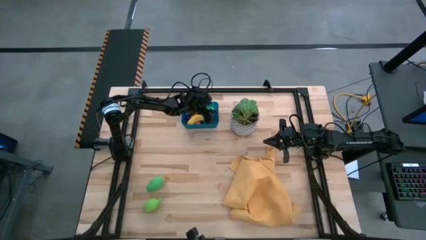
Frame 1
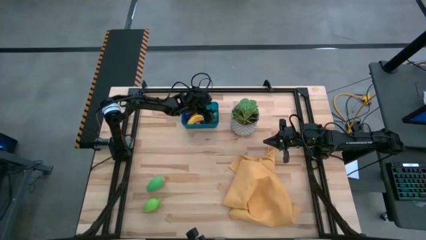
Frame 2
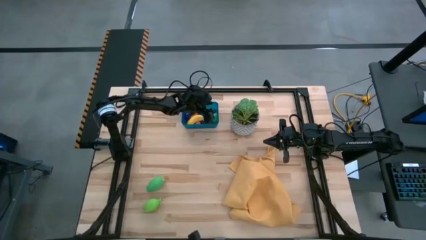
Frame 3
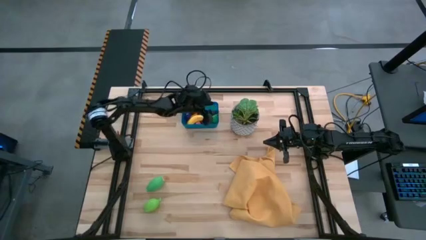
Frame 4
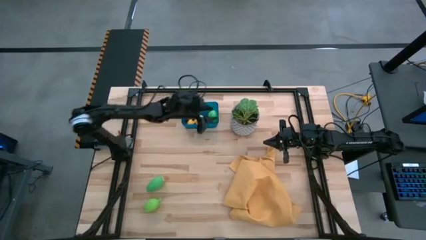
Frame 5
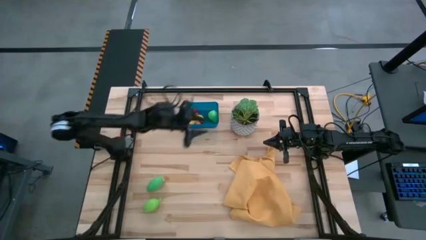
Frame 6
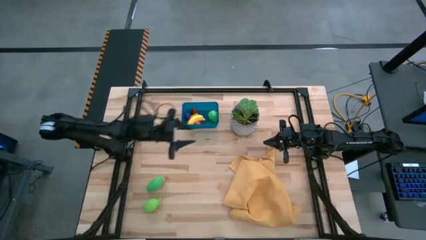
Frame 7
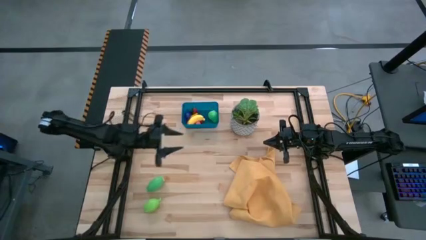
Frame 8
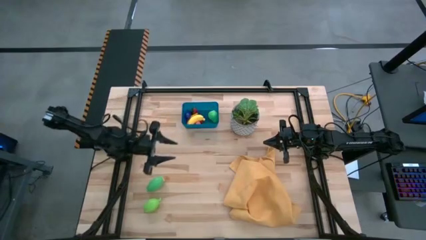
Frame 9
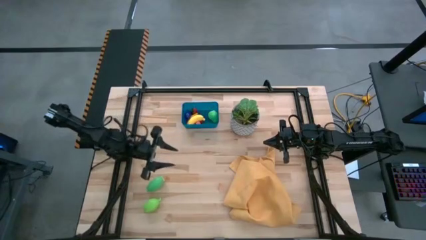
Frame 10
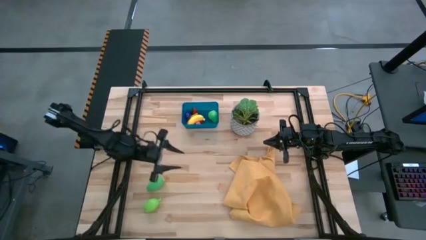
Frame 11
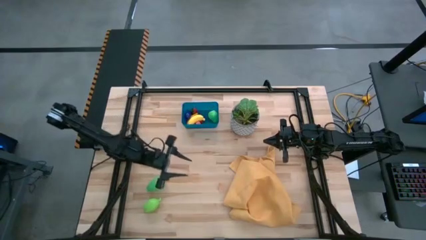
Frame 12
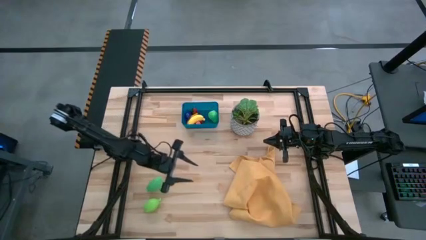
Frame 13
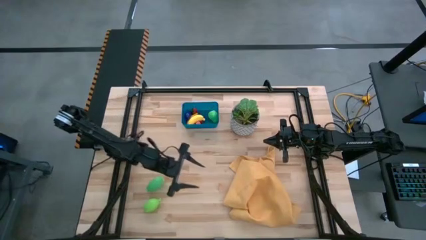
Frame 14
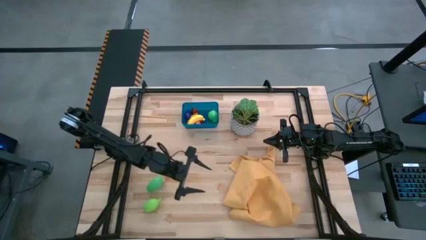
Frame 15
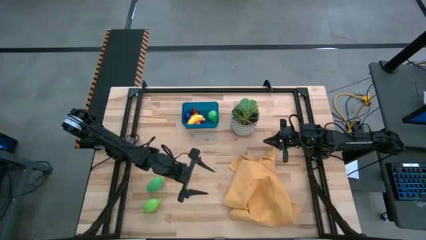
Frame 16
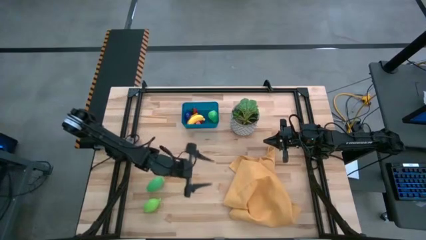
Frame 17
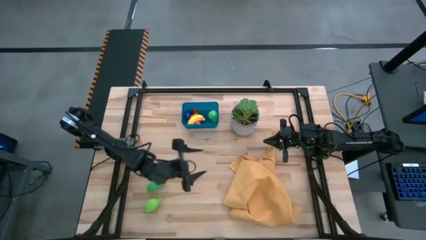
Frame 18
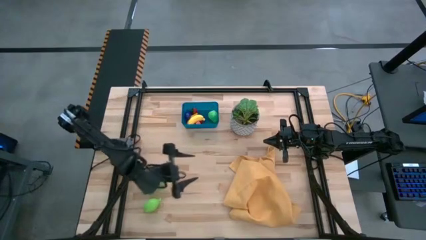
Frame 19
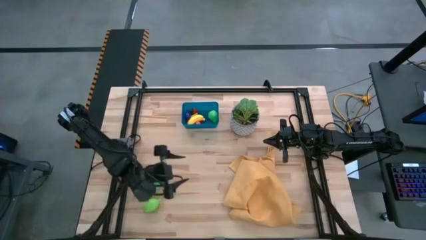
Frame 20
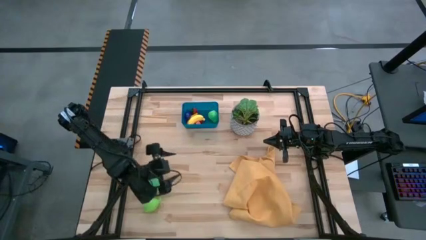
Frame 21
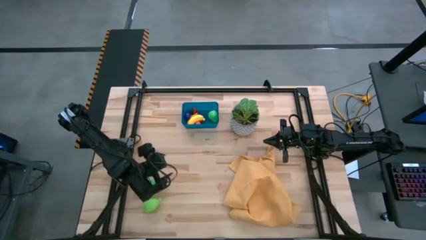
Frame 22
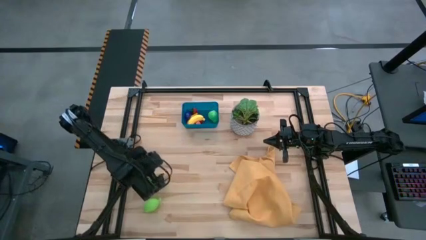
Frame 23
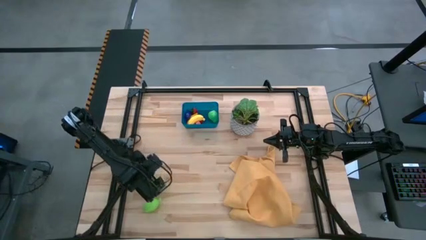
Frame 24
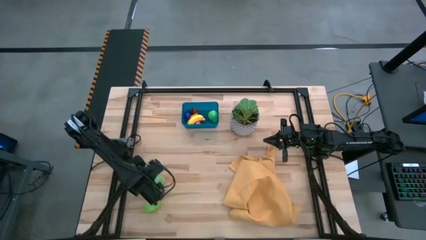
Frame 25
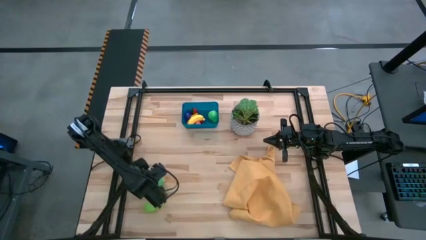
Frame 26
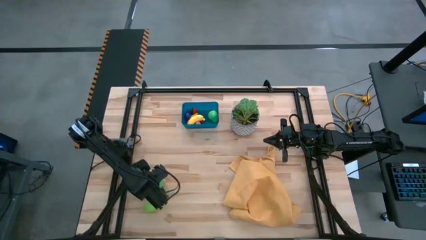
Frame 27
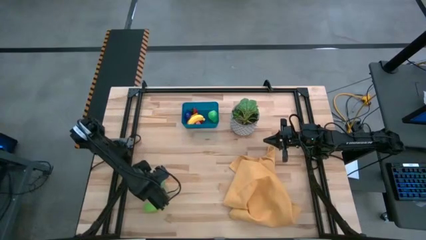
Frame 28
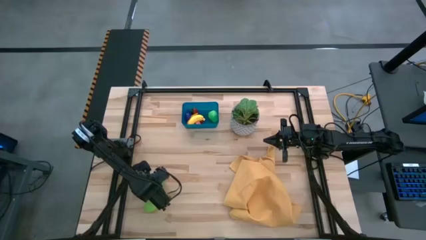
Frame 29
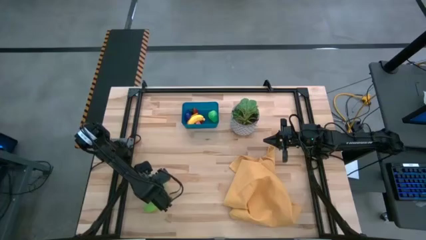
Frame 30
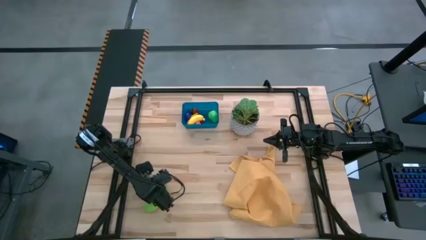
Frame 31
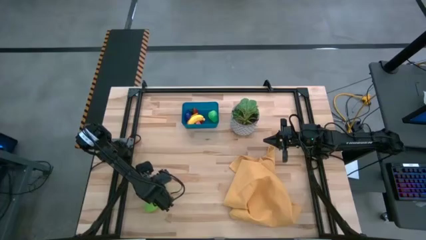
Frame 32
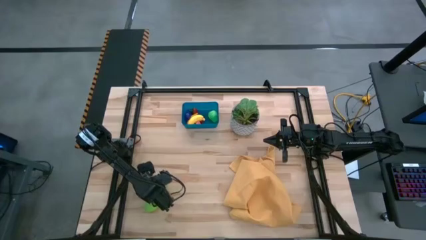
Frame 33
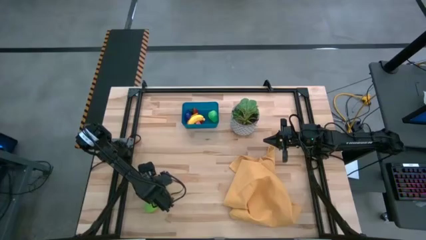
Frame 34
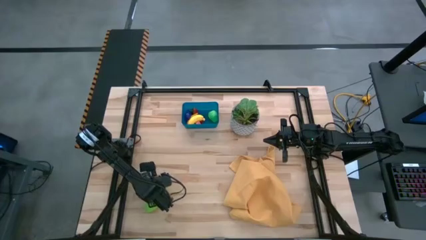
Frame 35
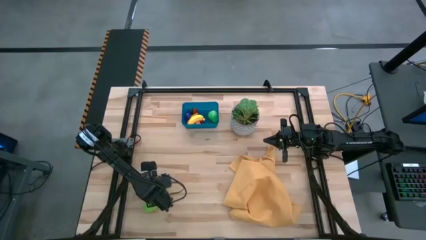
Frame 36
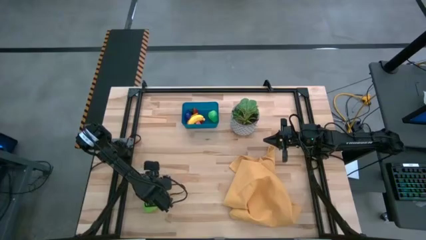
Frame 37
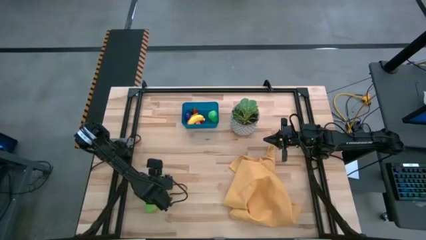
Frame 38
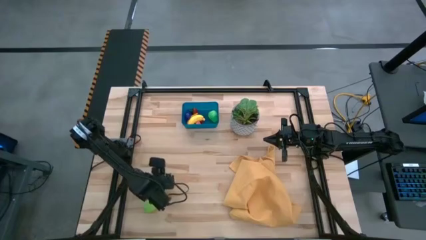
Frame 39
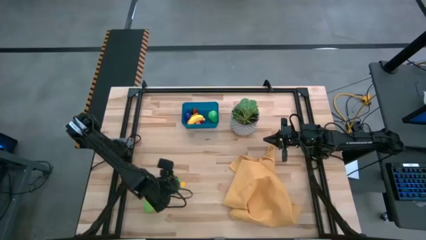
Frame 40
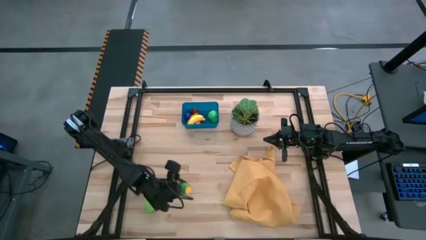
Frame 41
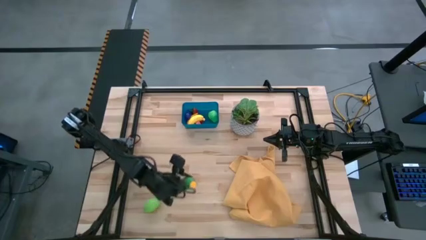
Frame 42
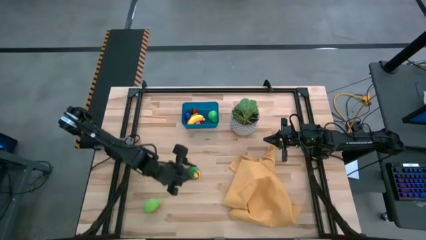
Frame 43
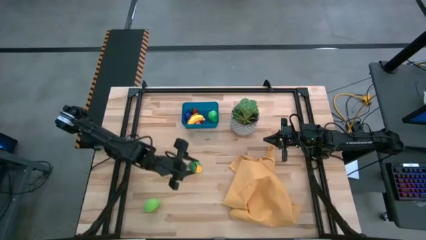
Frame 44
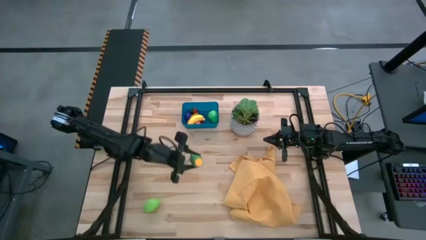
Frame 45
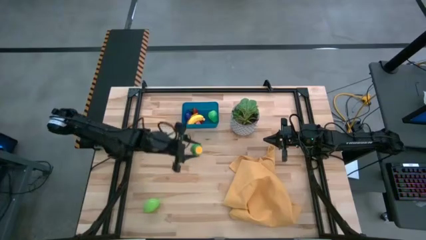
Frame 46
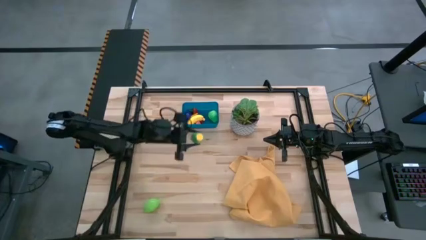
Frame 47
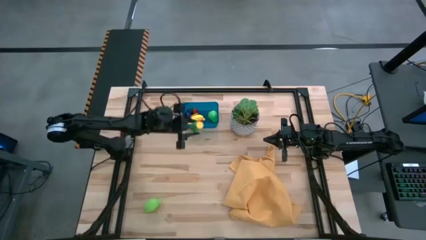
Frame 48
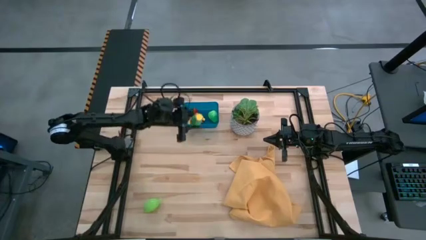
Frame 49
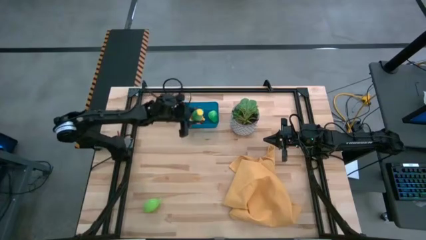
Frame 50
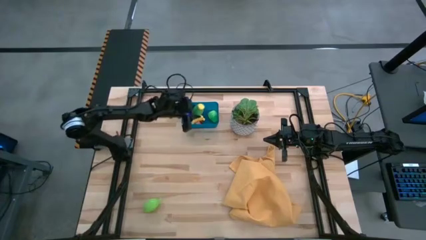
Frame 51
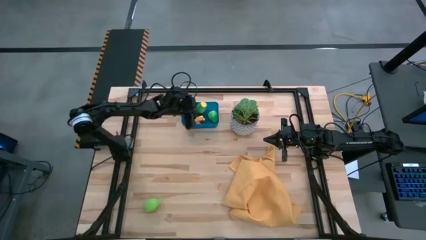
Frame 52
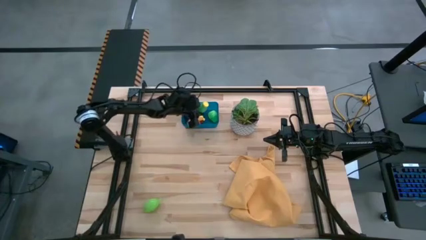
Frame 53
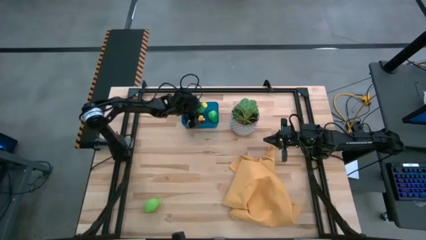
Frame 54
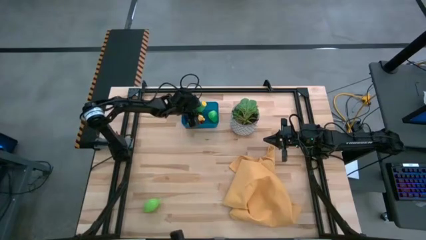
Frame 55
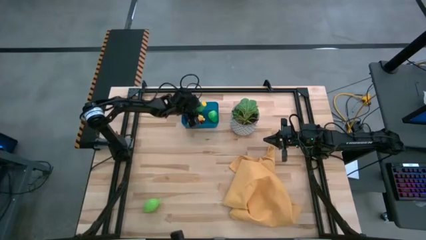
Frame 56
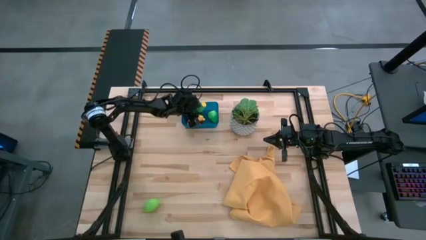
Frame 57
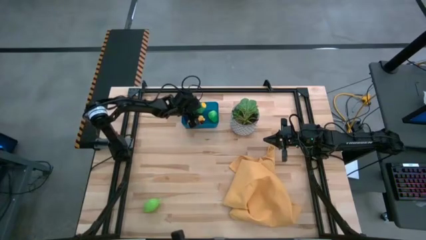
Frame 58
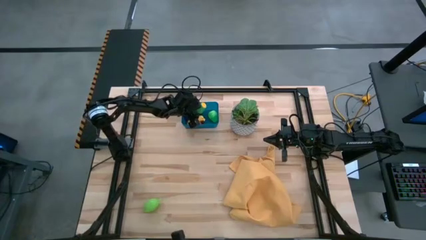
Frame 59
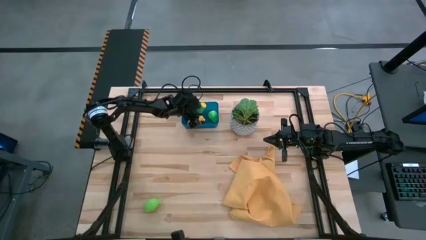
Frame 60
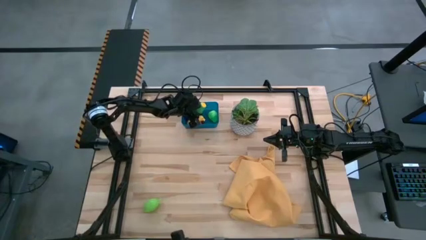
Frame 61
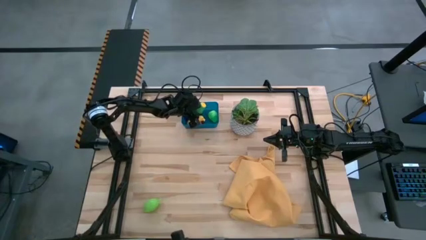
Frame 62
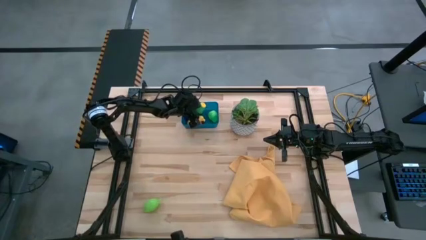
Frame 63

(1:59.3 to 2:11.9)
Task: Pick and placing Produce into tupperware
Put the green corn into the blue bin

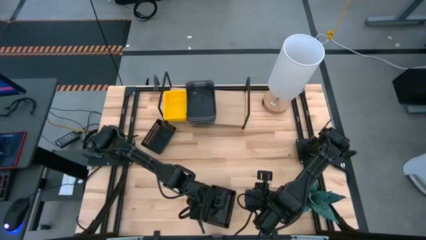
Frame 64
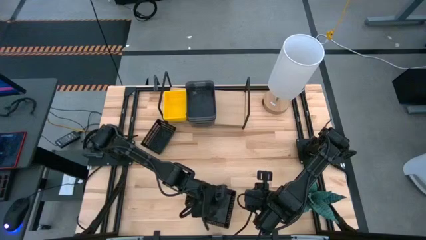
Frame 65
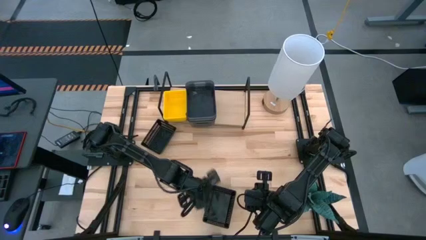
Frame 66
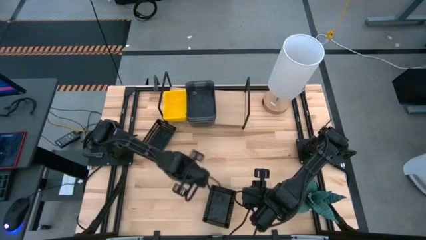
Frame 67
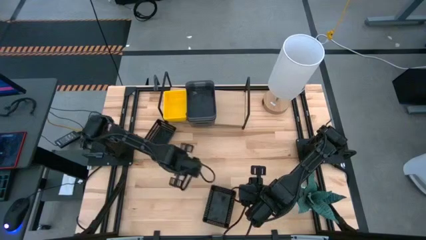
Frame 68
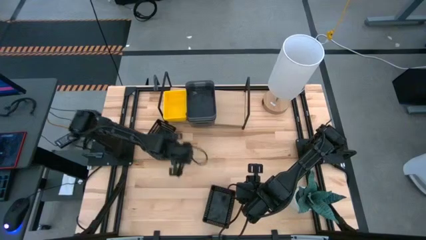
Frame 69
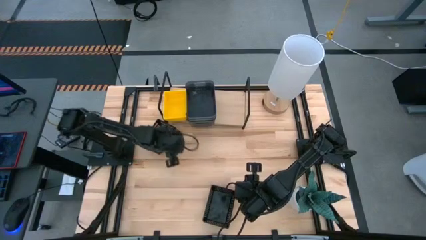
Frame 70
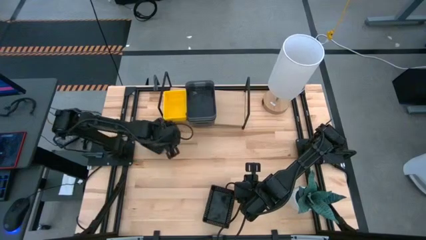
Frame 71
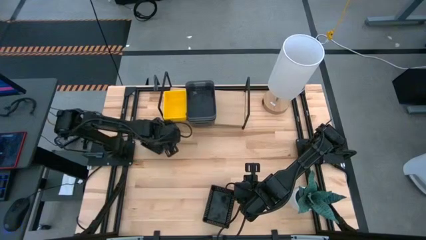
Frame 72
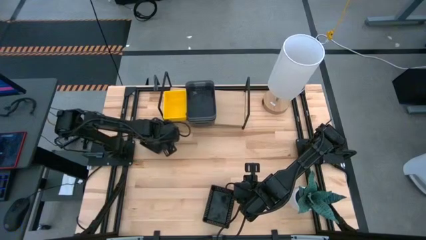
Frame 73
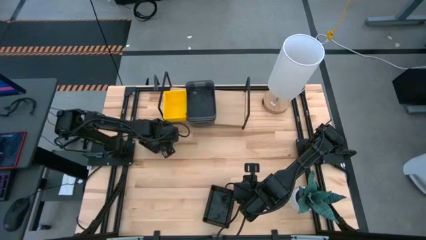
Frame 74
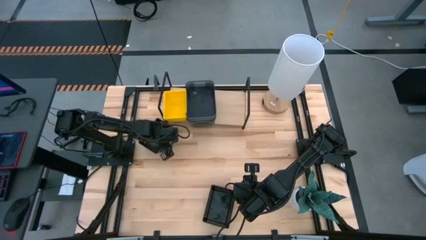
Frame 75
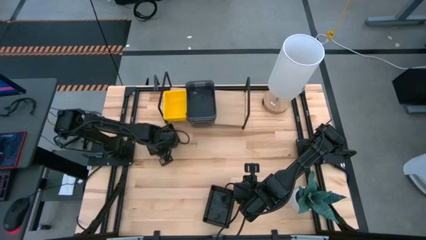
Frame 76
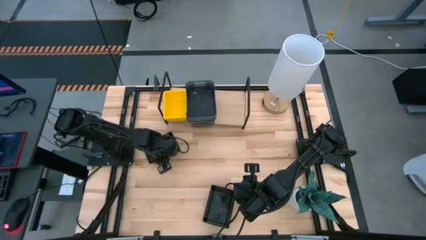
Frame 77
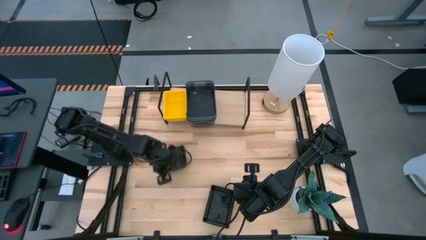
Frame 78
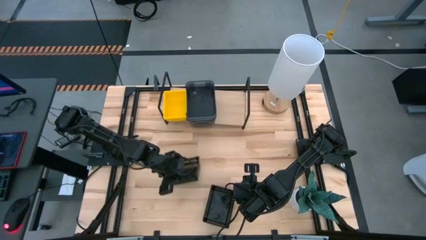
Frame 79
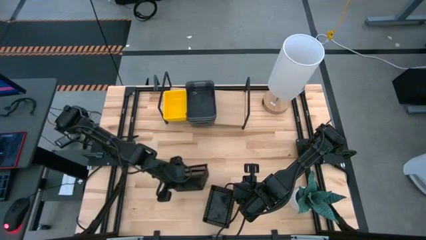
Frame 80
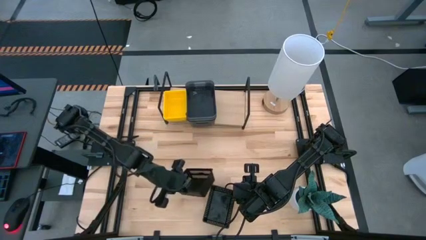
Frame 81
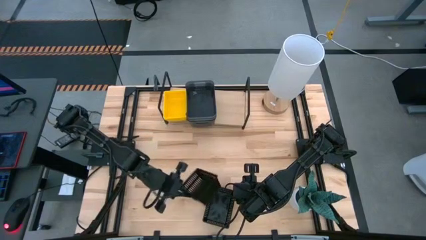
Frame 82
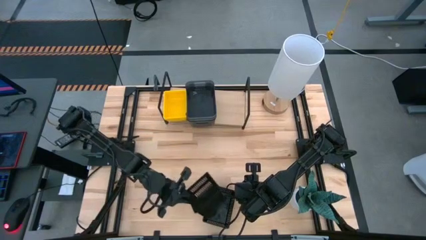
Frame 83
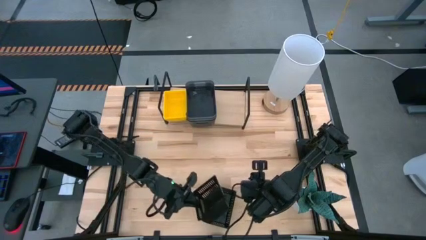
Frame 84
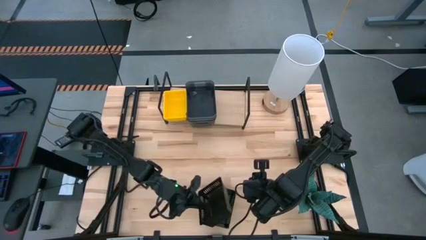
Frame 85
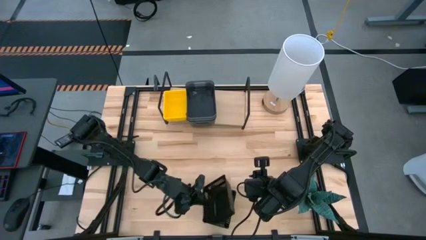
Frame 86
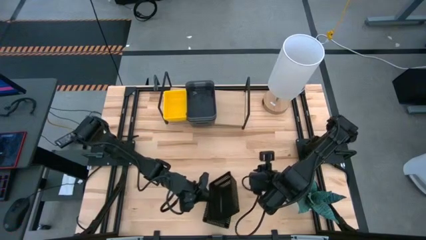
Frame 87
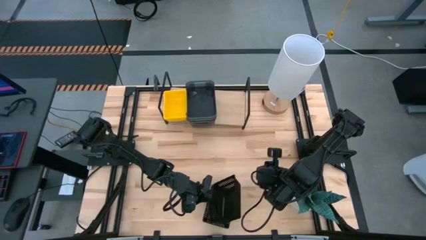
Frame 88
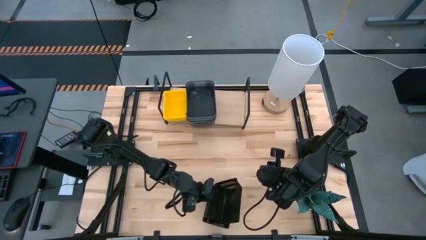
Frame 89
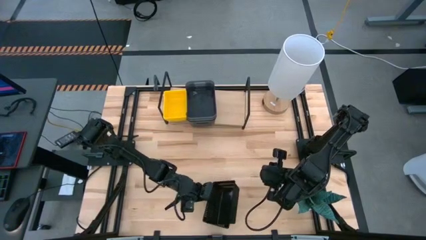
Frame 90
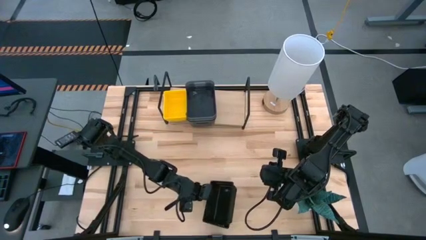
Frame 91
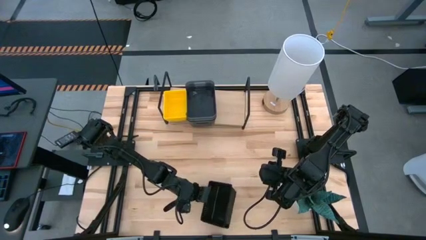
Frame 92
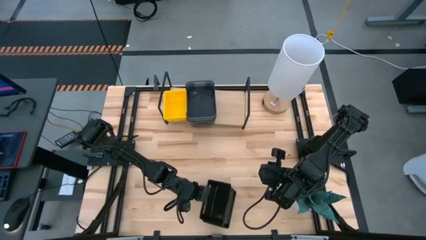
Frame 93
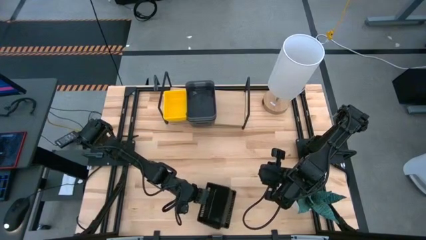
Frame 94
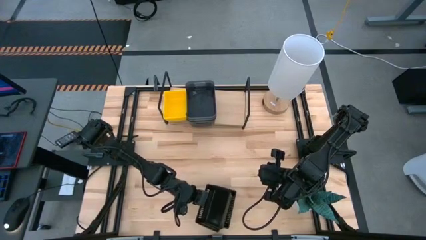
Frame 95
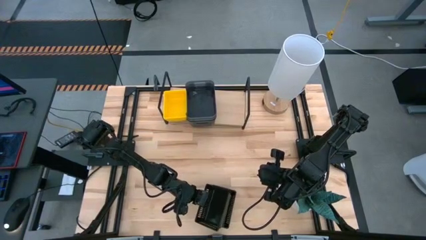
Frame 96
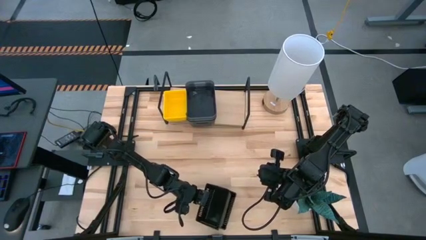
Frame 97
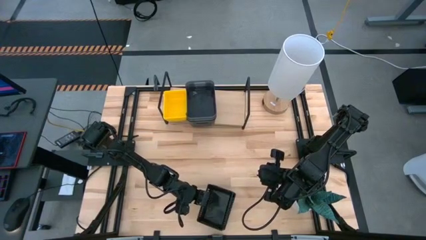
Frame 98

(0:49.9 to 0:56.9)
Task: Stack baskets on shelf by color
Stack the top black bin on the black bins
